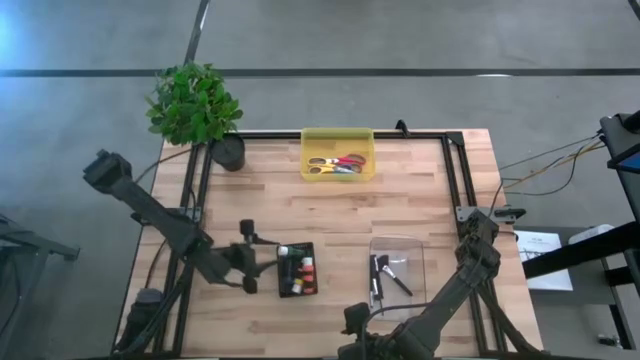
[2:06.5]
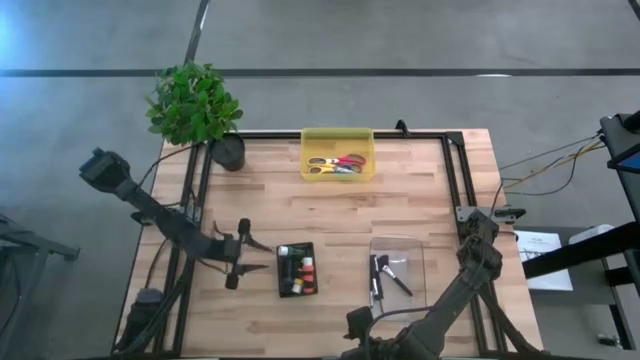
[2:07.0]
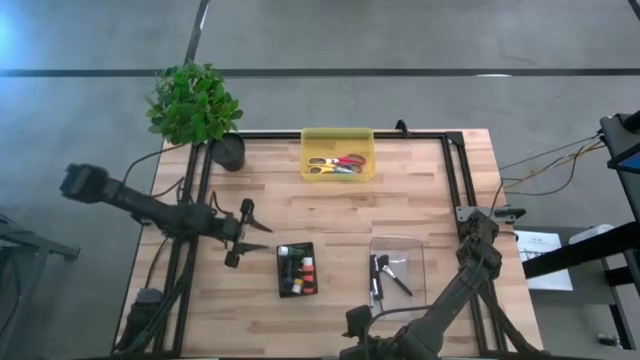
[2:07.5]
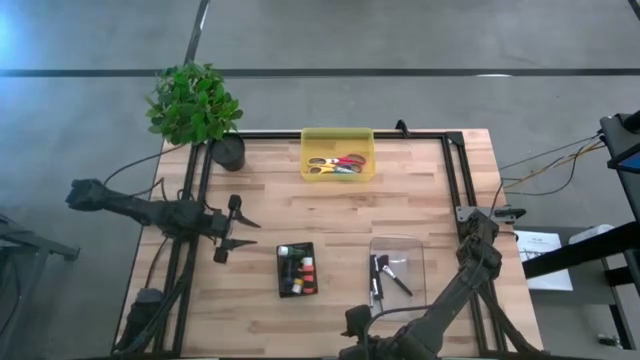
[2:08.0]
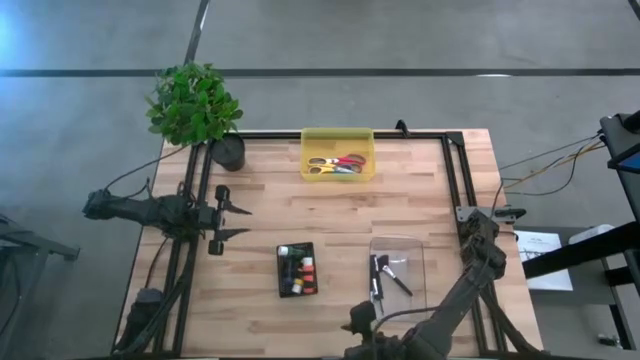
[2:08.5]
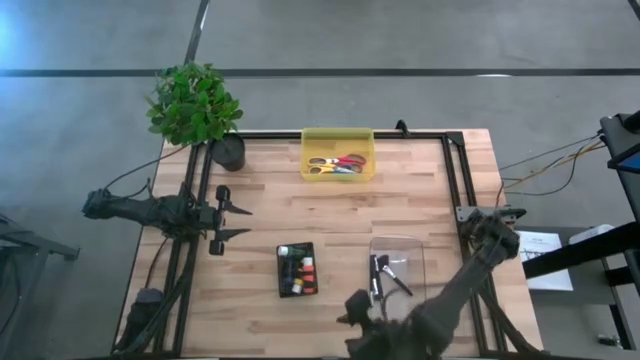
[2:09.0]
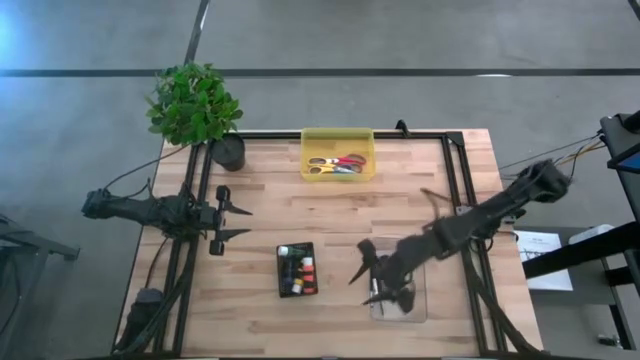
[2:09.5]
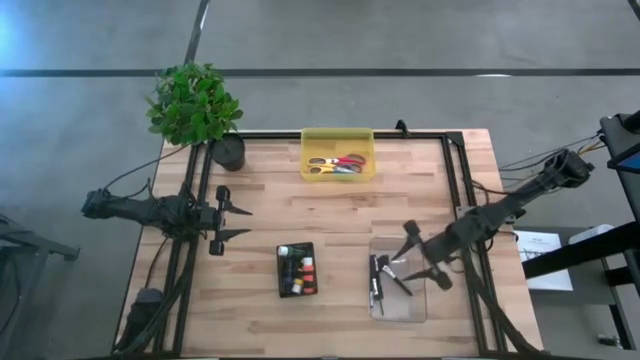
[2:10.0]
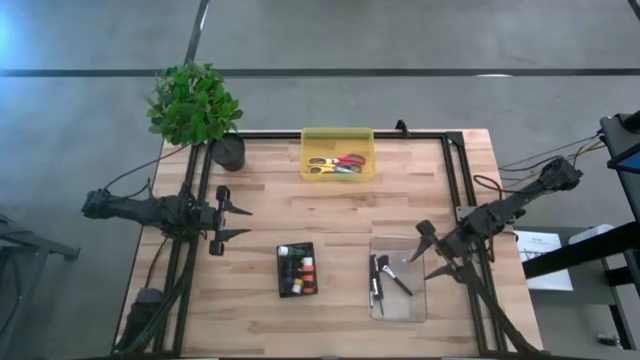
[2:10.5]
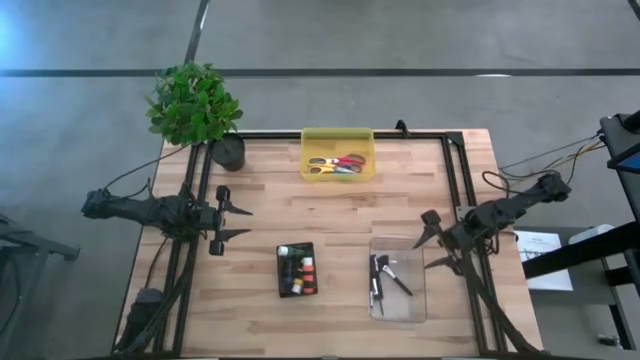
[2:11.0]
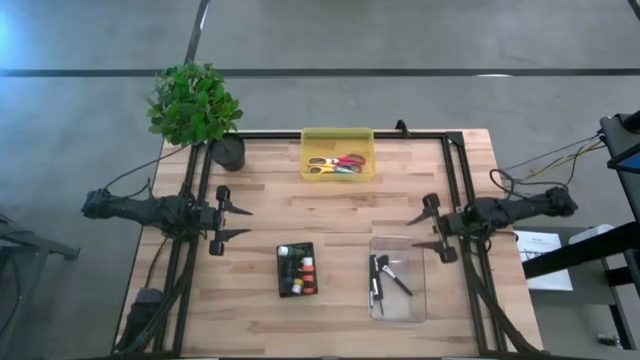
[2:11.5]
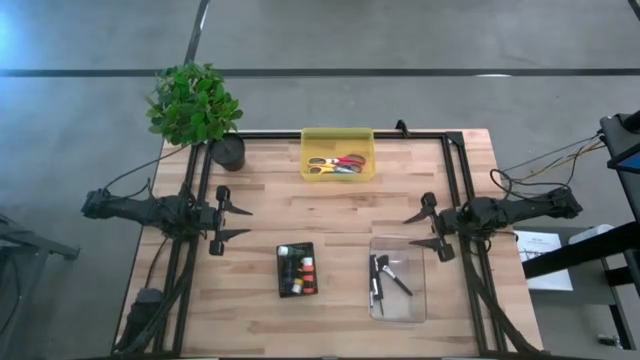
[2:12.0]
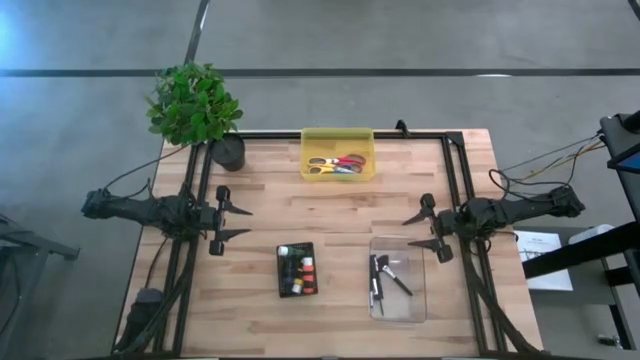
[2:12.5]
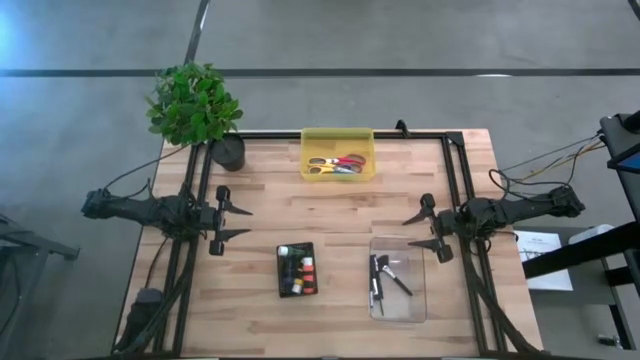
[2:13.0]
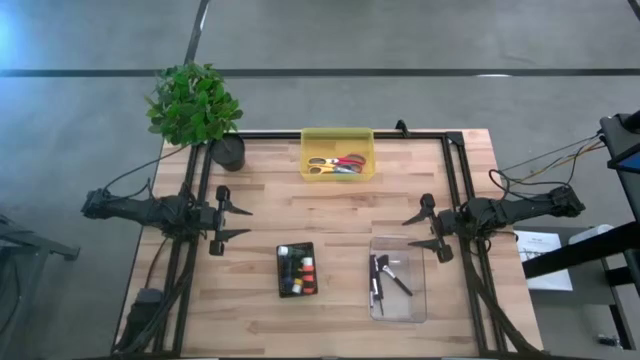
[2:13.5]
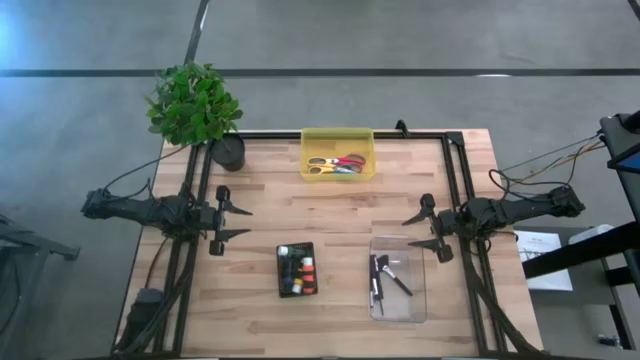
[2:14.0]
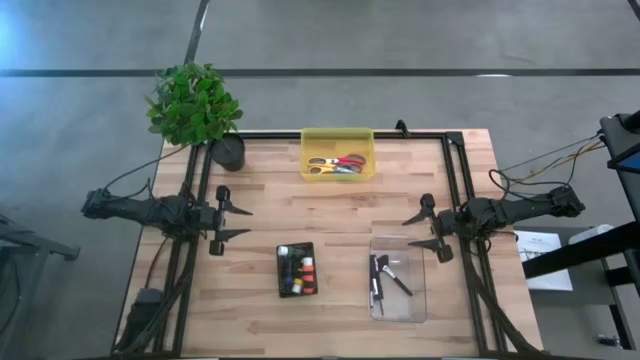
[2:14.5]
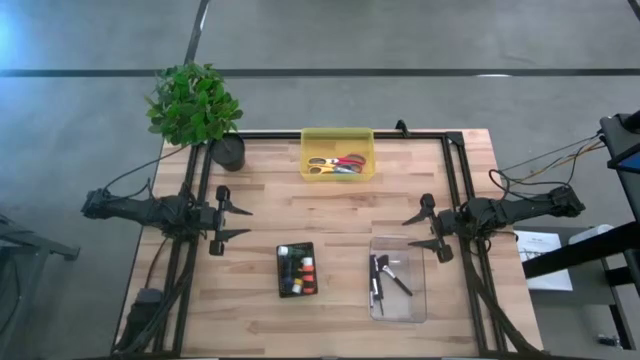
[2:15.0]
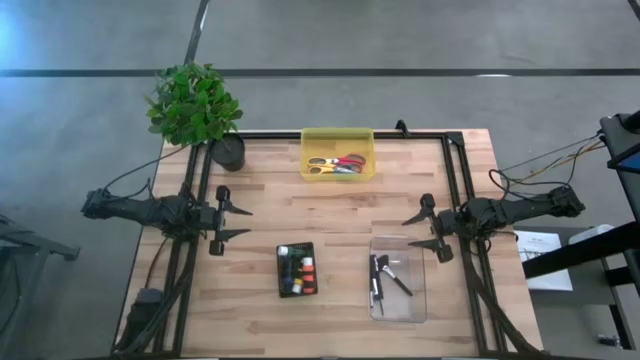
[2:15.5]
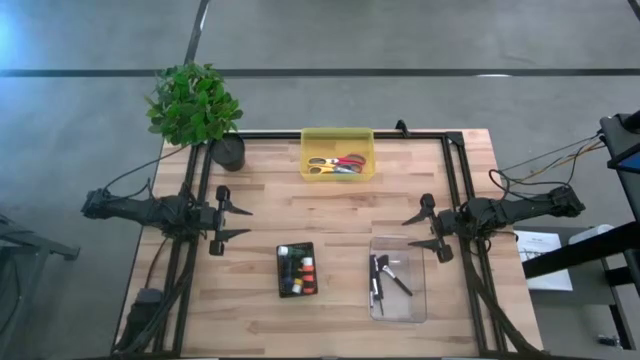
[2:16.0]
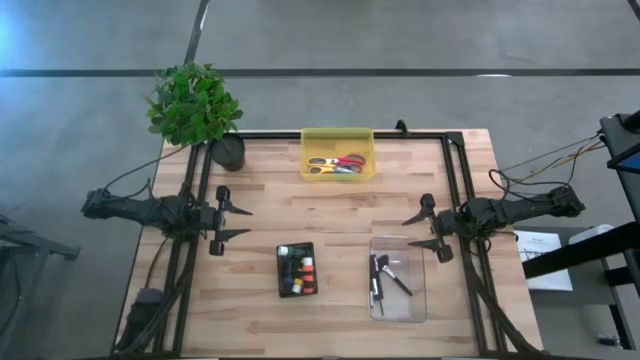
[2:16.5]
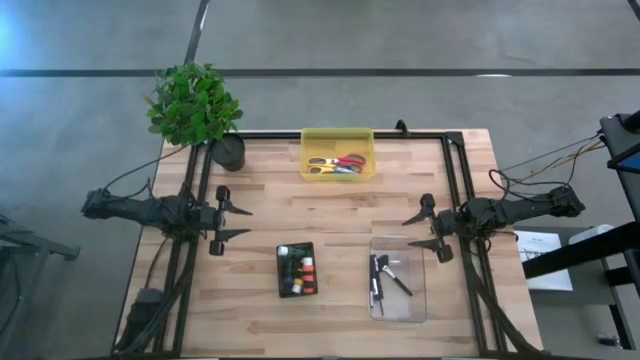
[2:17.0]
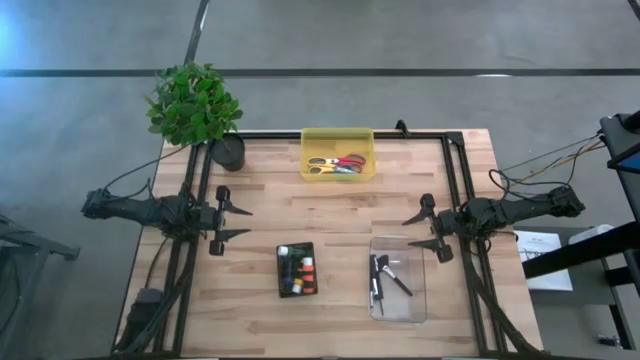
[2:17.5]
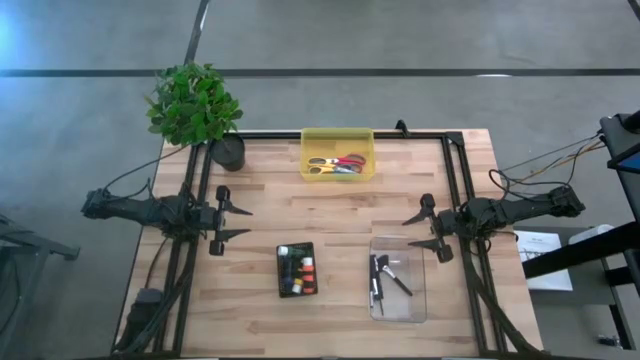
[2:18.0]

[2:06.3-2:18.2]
Task: Pick & Place Paint Supplies
Return to Home Position
